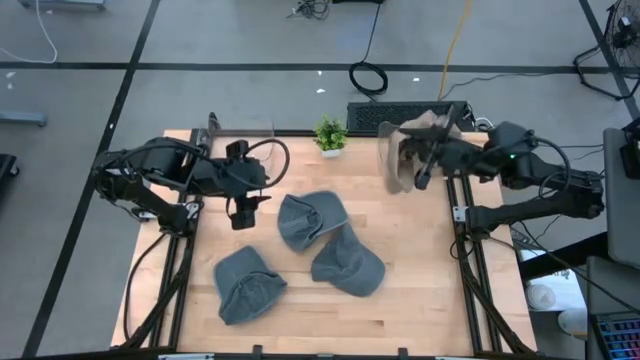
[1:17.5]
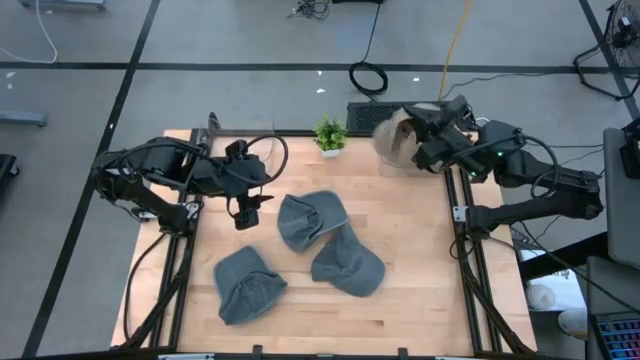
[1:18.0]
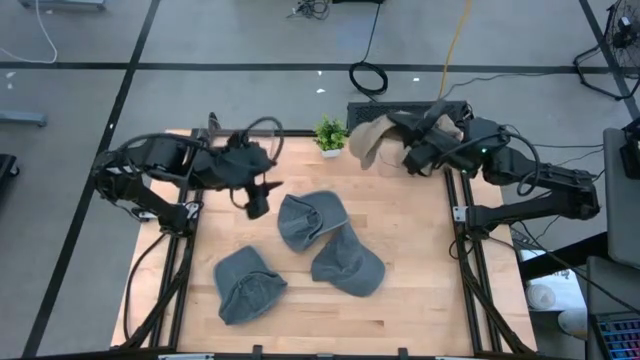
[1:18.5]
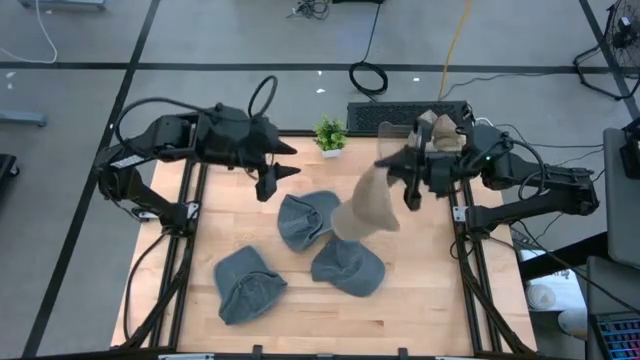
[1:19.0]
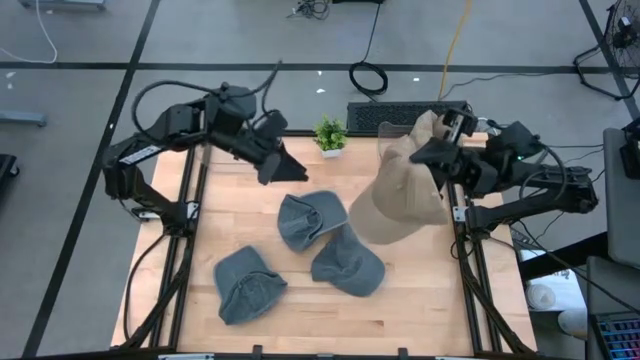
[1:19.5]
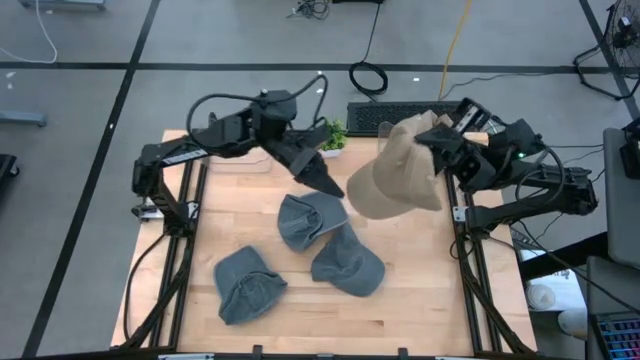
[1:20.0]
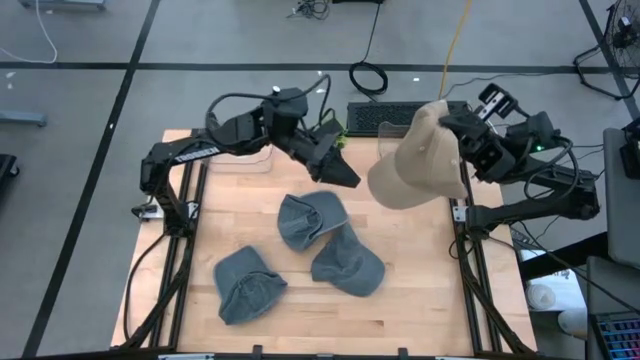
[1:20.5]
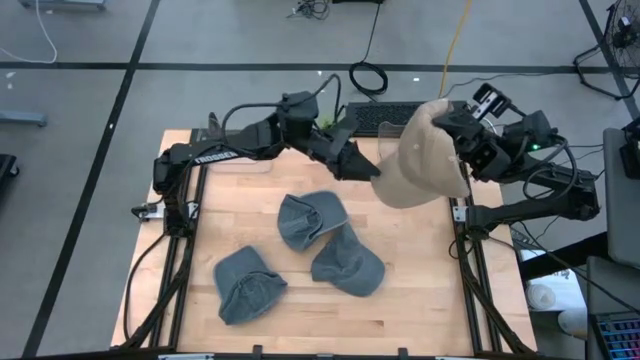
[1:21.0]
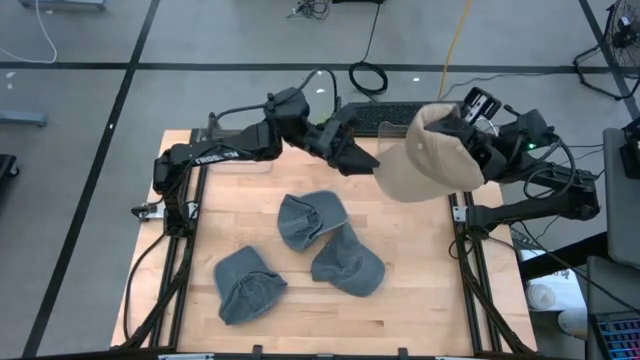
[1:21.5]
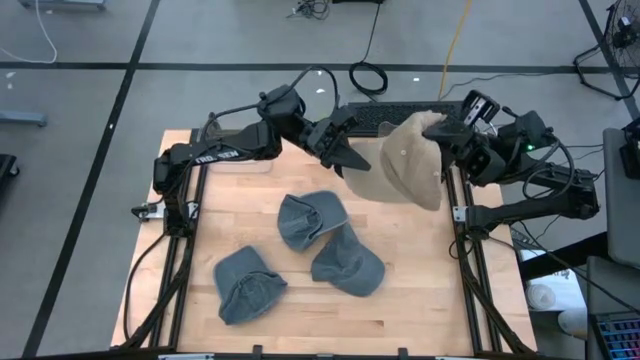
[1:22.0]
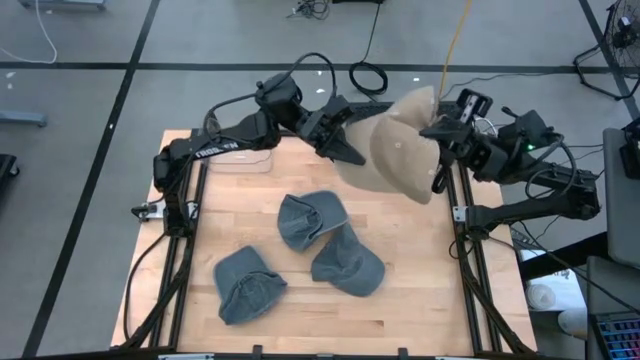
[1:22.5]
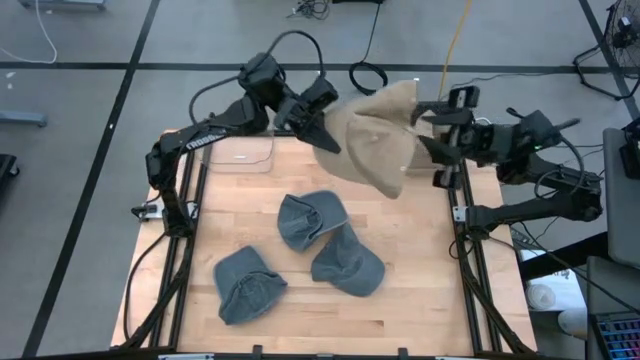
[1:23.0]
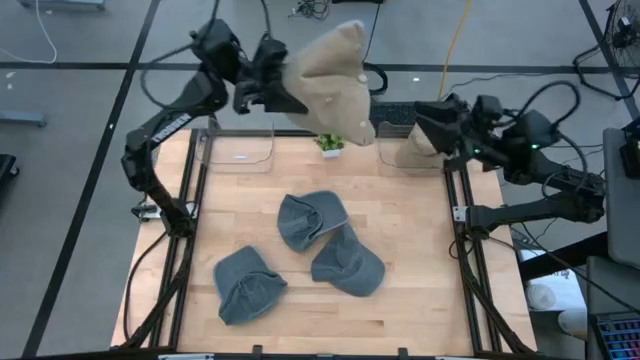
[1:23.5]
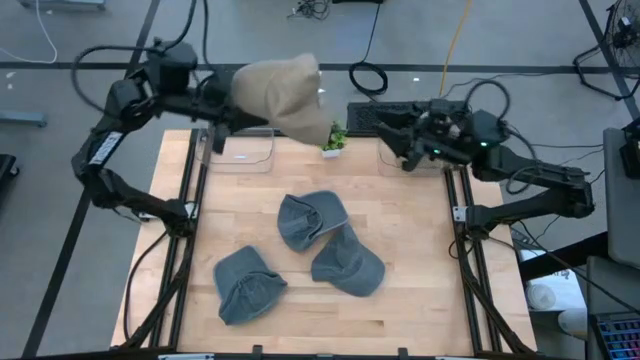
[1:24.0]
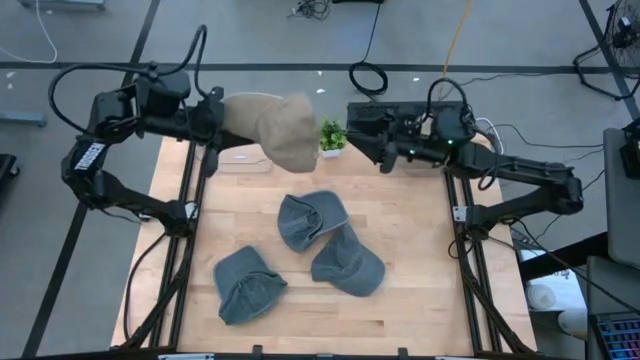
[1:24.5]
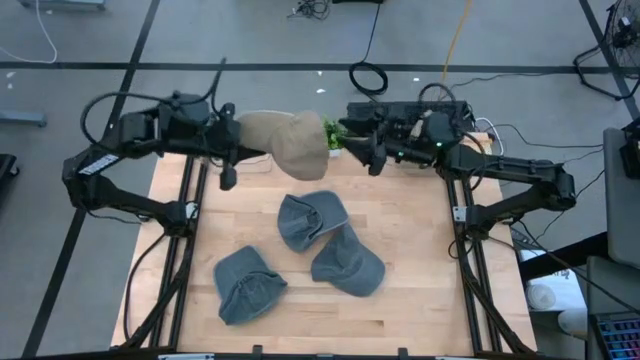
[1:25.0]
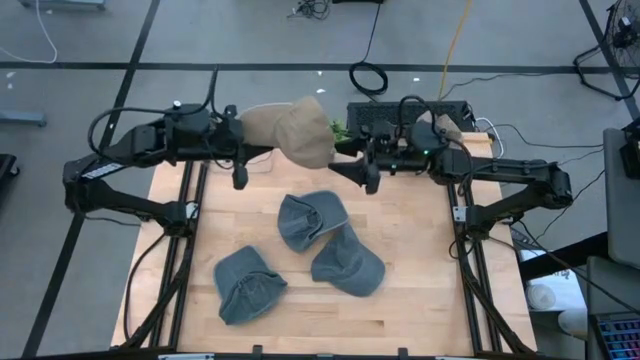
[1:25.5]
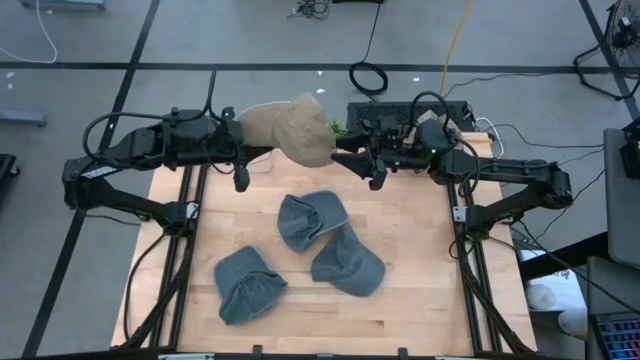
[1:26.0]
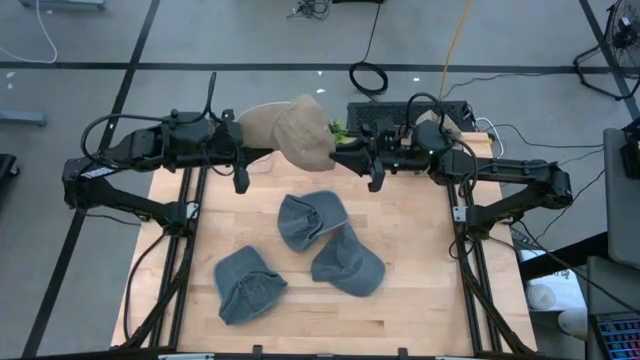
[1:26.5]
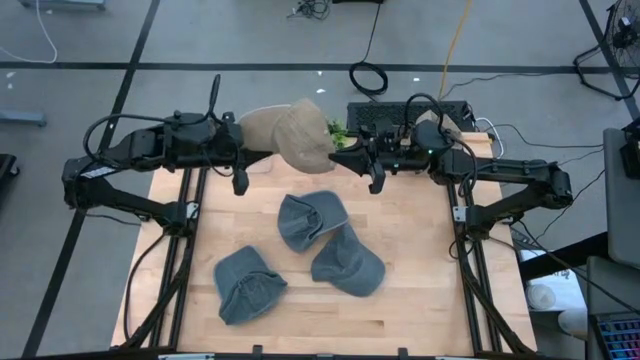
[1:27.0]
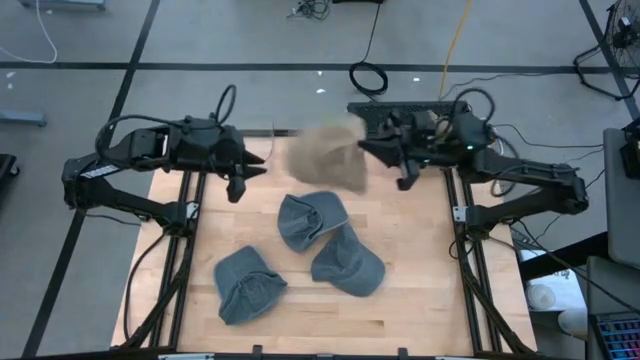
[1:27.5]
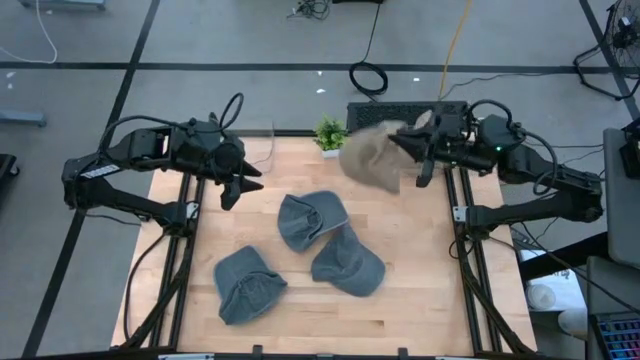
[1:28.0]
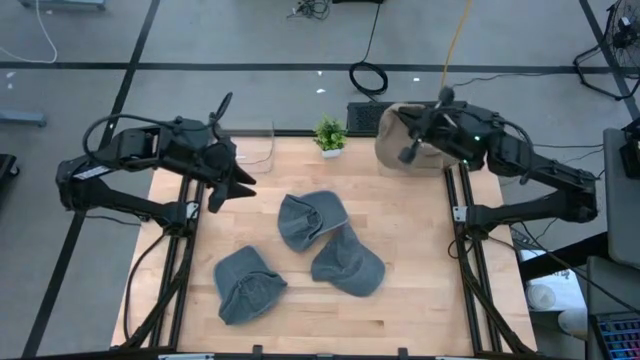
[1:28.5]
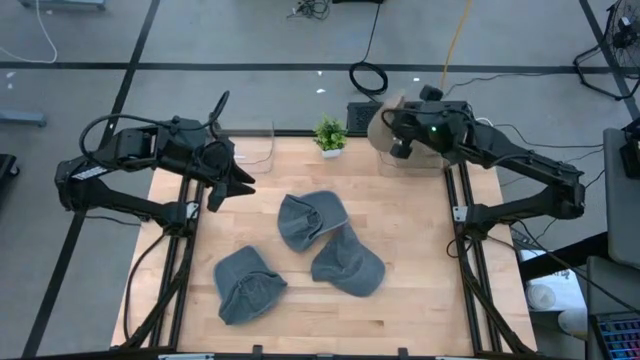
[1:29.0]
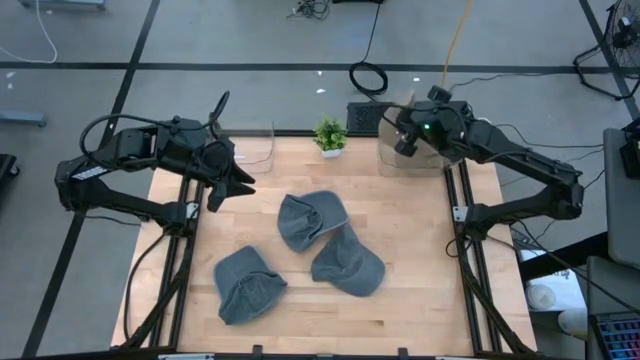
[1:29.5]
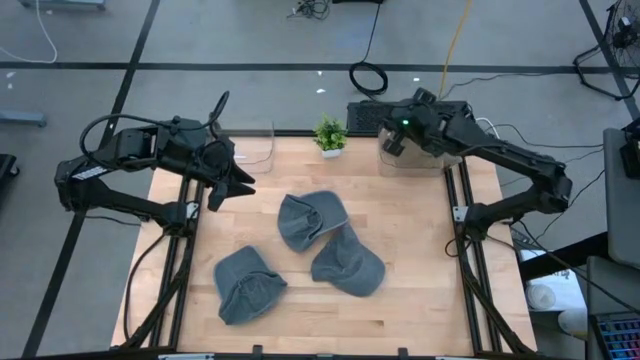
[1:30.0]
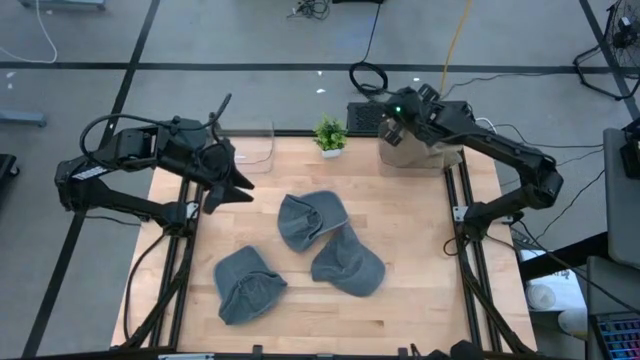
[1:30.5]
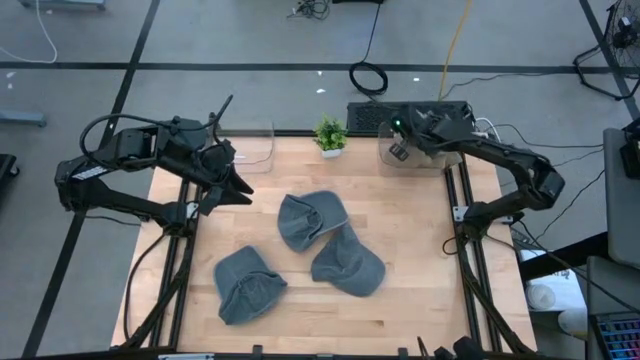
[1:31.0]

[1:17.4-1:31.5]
Task: Pick & Place hat
Put the brown cap into the right transparent bin

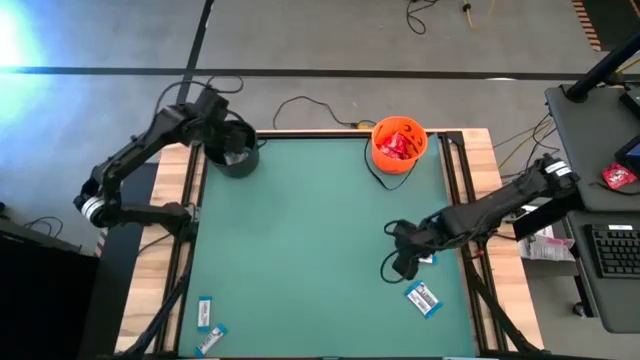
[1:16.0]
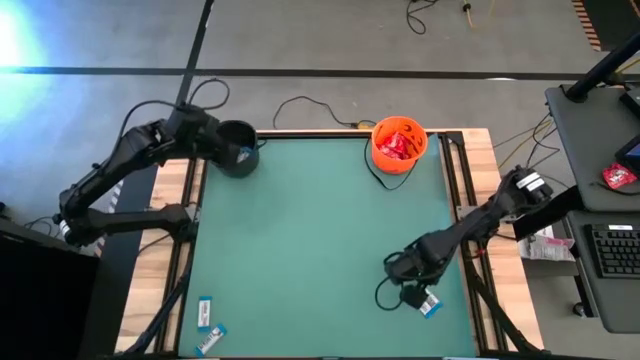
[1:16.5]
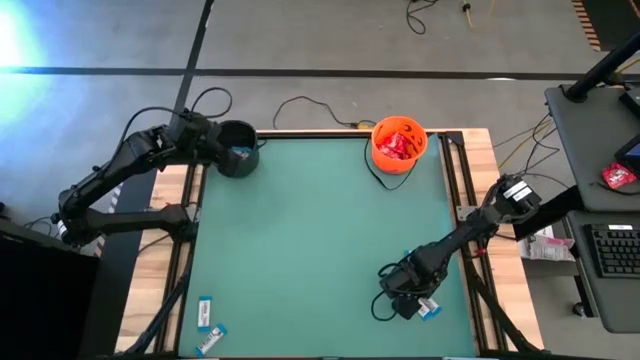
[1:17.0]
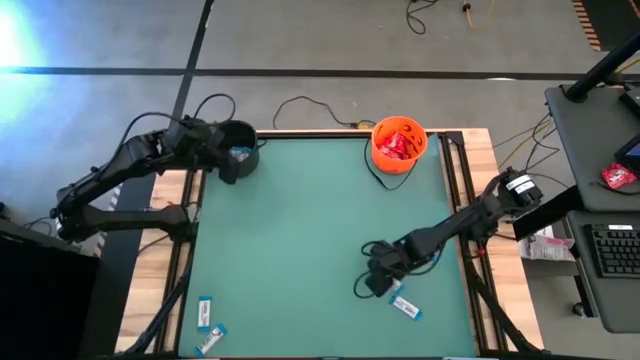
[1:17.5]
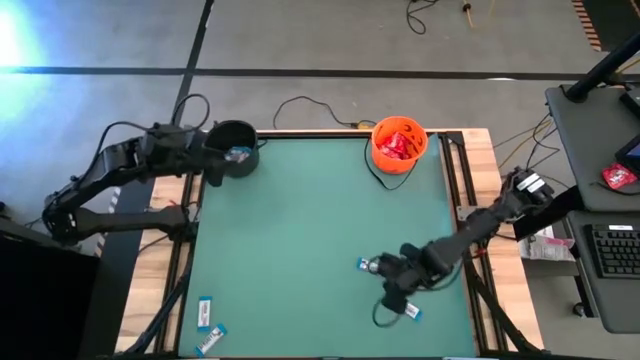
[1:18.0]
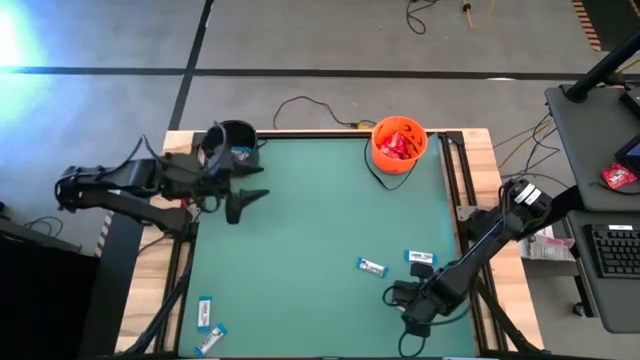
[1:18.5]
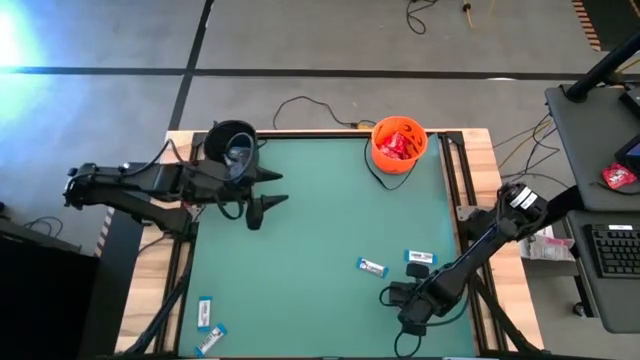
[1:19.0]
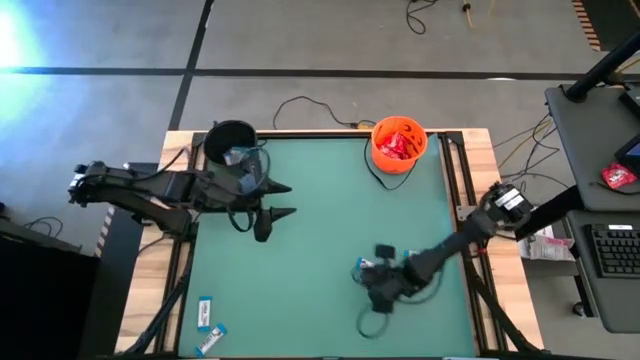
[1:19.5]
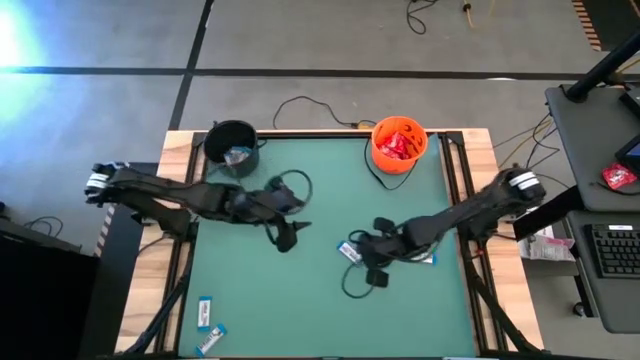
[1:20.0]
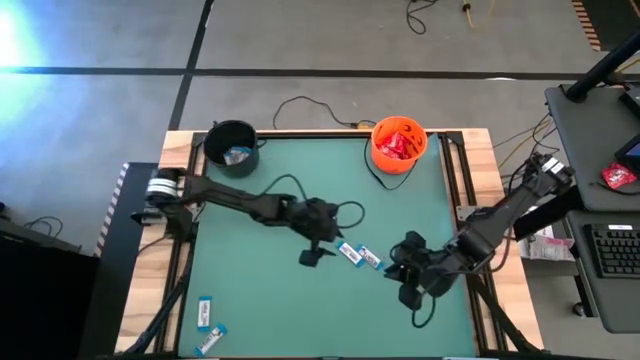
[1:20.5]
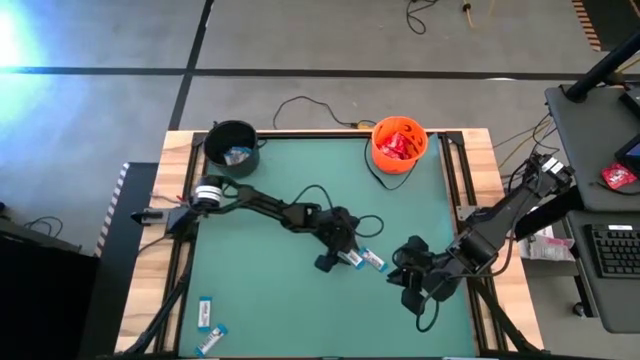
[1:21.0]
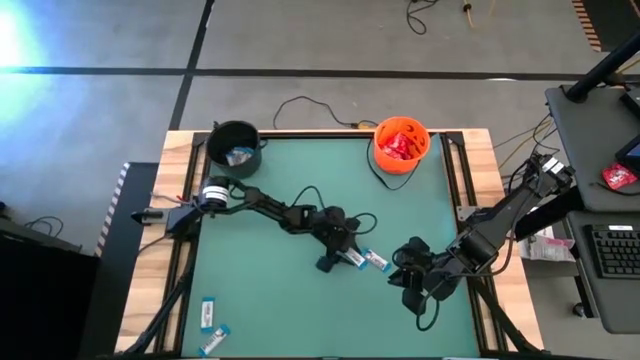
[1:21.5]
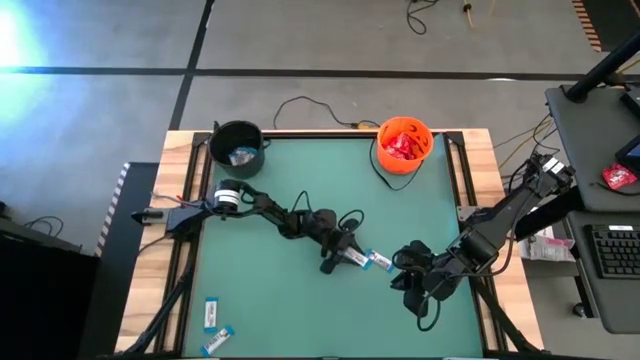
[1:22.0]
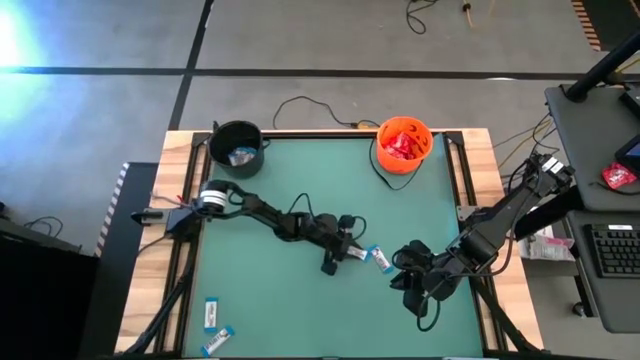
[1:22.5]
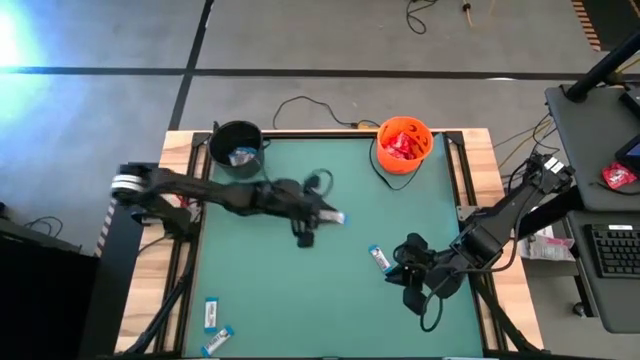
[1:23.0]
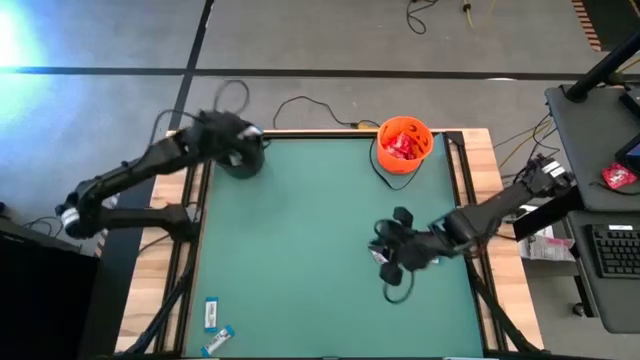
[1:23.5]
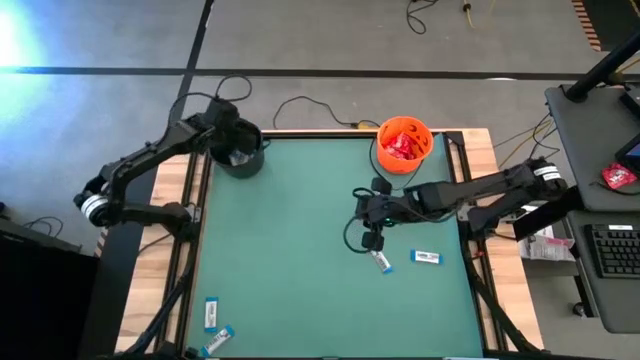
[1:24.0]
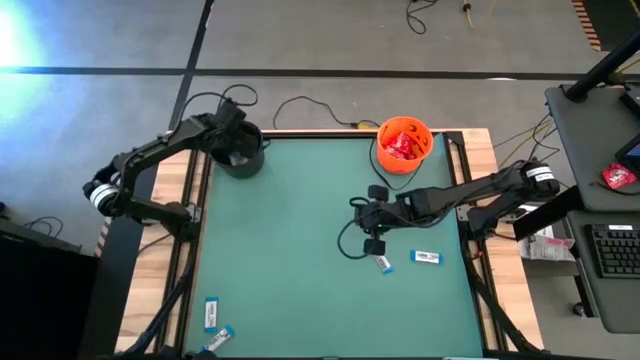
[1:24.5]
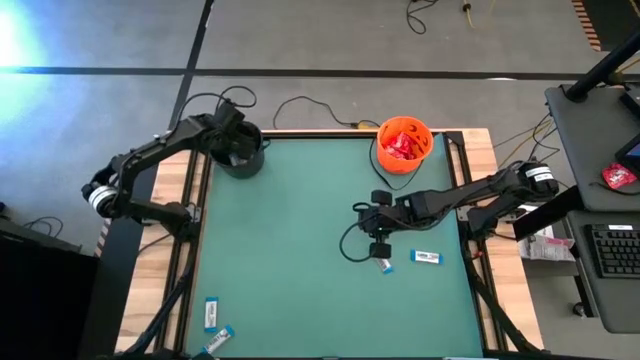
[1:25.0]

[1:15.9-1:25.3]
Task: Sort candy by brand, put in halloween buckets
Put the white candy into the black bucket
